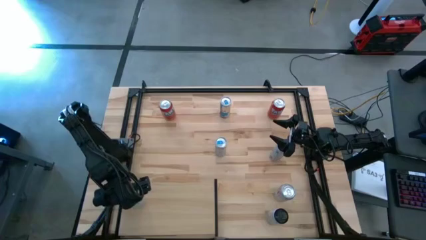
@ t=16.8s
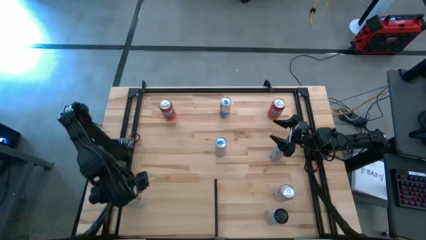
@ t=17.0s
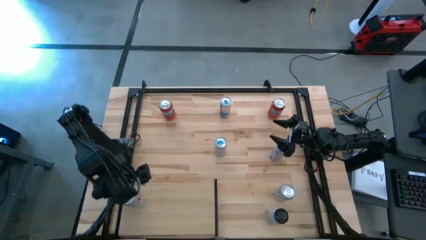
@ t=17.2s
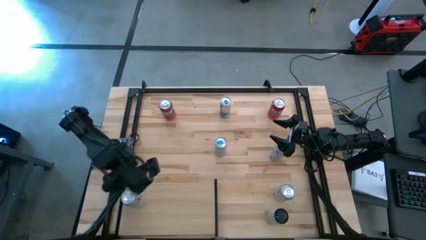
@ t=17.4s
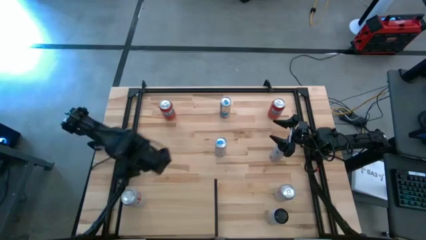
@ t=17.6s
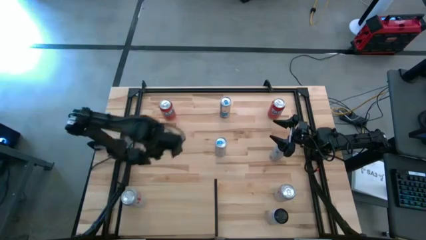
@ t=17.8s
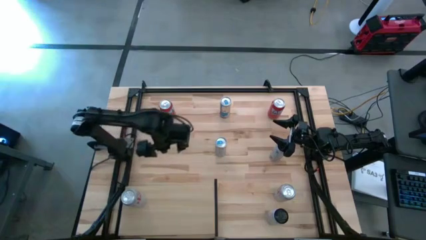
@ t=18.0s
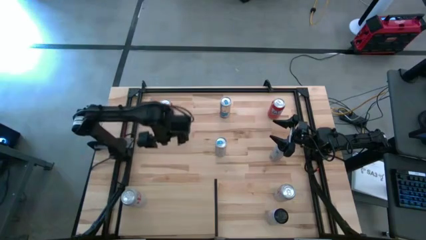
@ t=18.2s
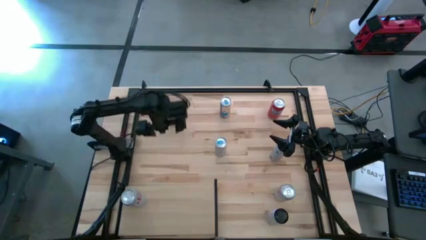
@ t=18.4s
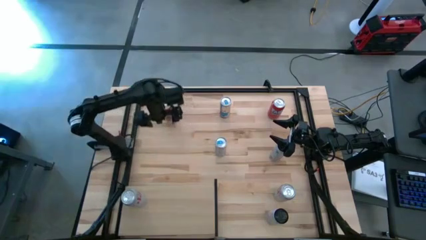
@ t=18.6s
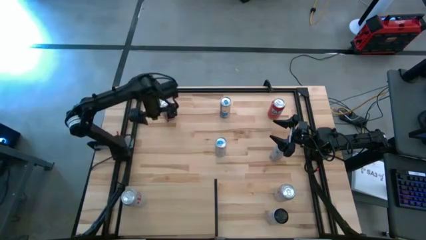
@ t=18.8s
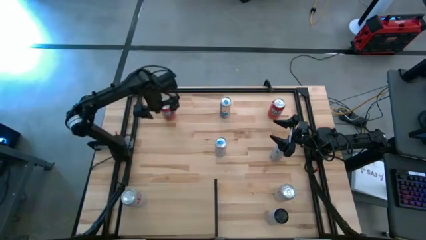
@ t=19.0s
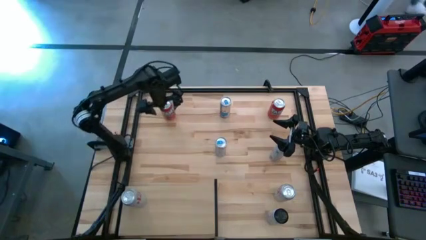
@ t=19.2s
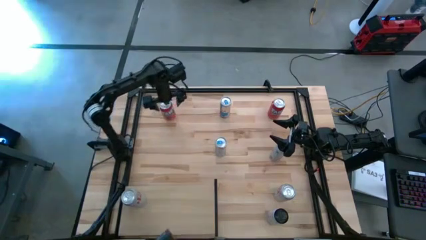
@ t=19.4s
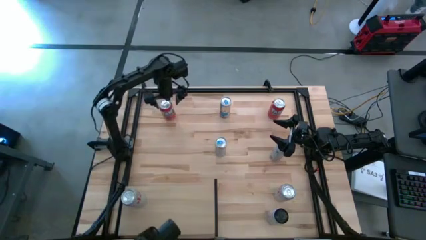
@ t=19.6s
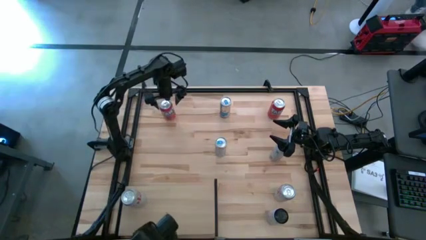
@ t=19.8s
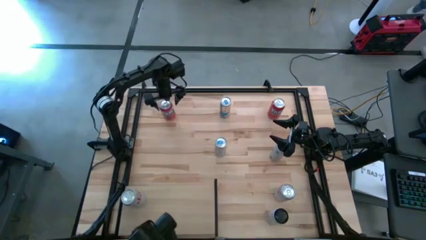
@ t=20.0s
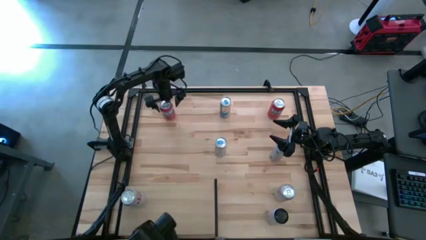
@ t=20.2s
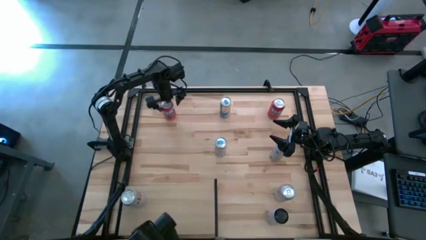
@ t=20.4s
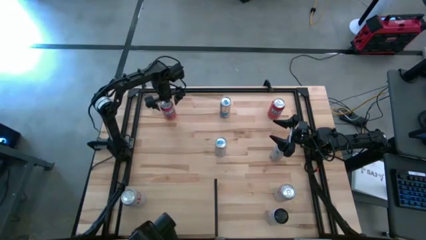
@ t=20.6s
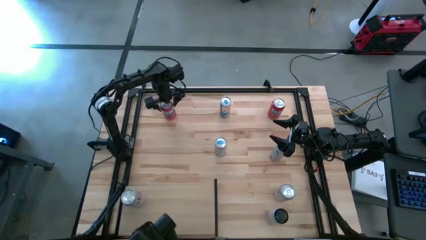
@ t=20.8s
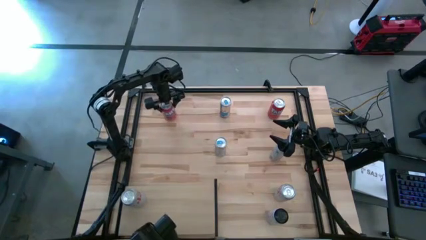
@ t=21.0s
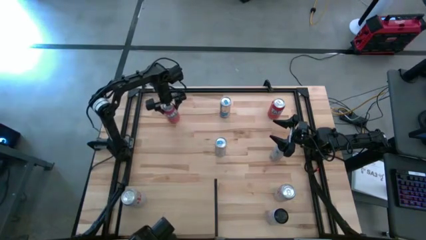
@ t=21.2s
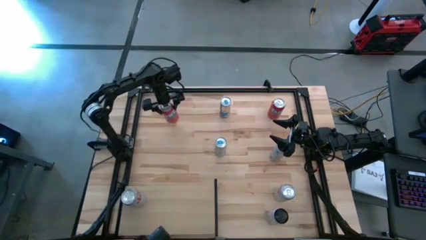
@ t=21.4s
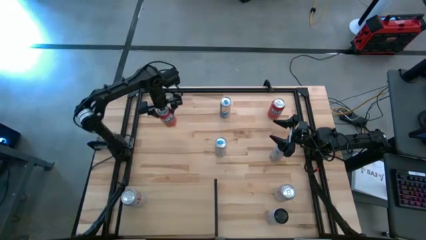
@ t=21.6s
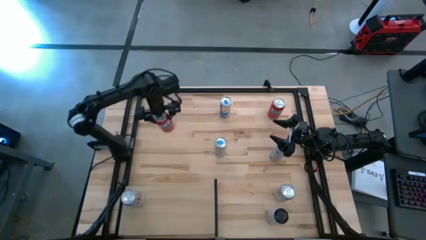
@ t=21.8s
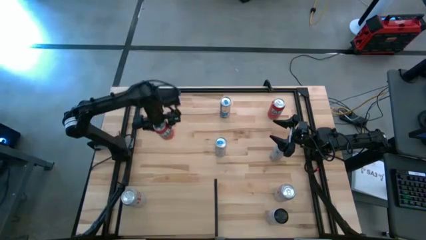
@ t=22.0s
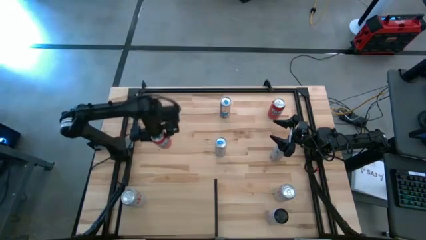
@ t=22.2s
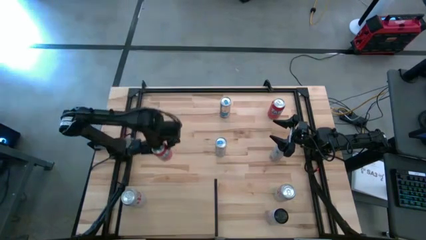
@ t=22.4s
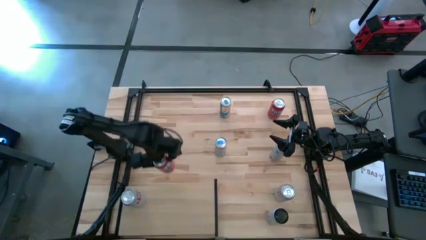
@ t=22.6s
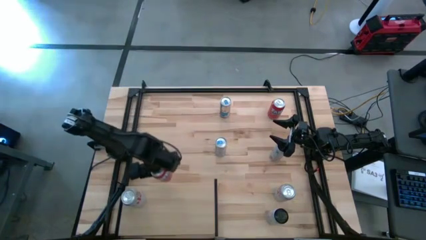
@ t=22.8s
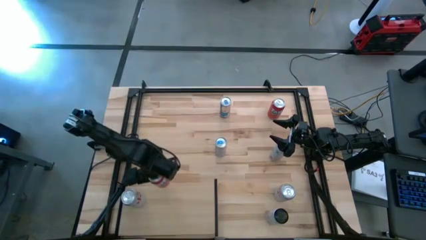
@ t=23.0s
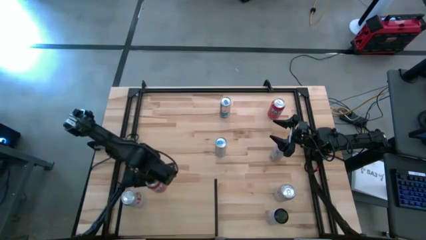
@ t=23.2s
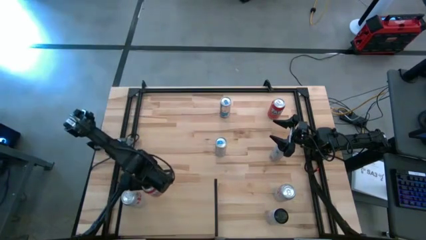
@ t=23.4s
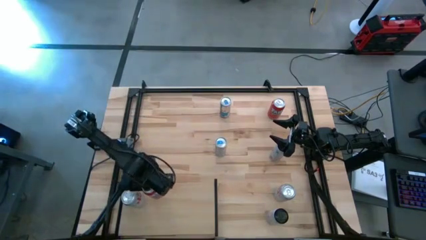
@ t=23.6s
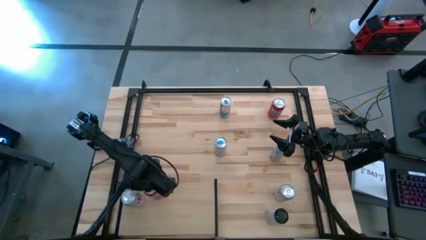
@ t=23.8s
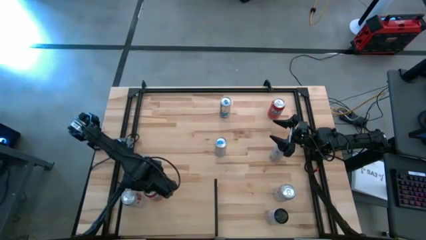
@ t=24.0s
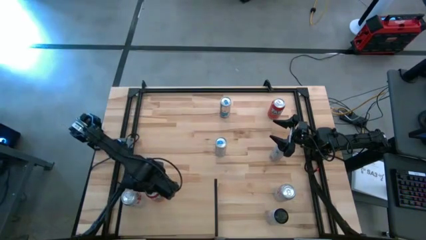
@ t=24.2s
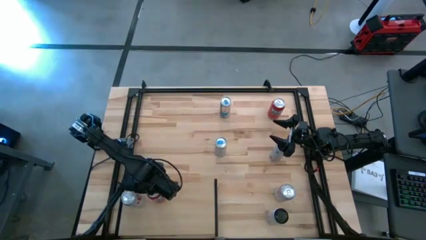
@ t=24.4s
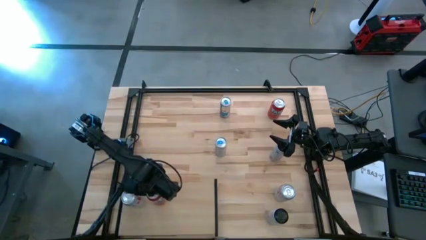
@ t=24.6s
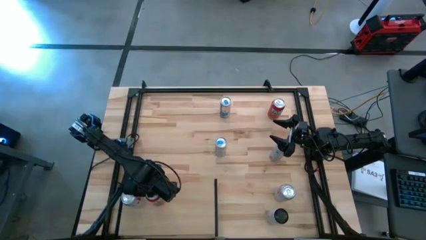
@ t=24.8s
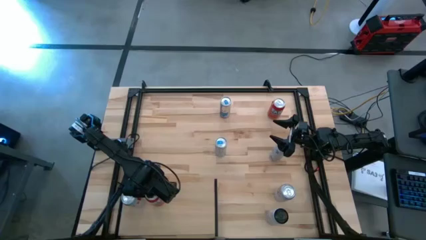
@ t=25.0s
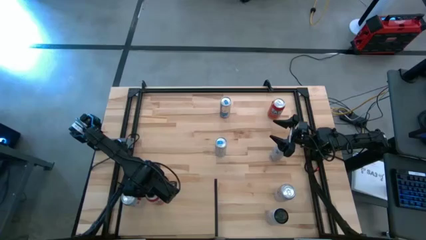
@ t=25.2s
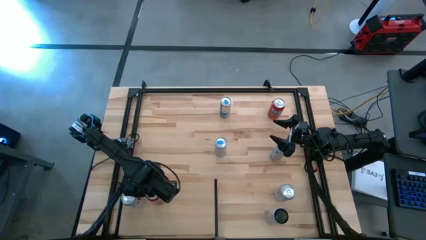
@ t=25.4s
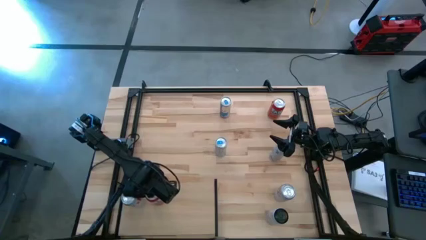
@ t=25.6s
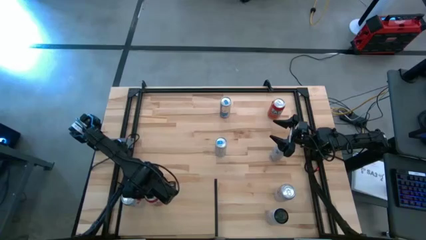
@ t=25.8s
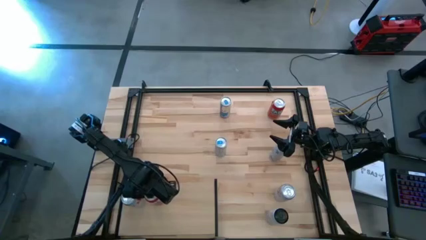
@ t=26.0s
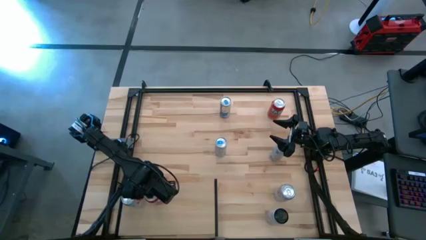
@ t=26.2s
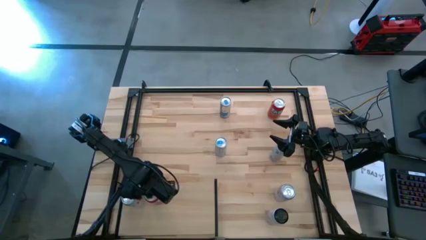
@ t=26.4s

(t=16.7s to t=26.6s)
Task: Place canned beverage on shelf
Put the left orange soda can on the shelf
